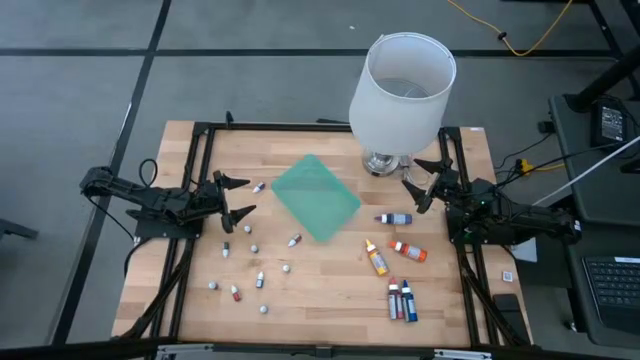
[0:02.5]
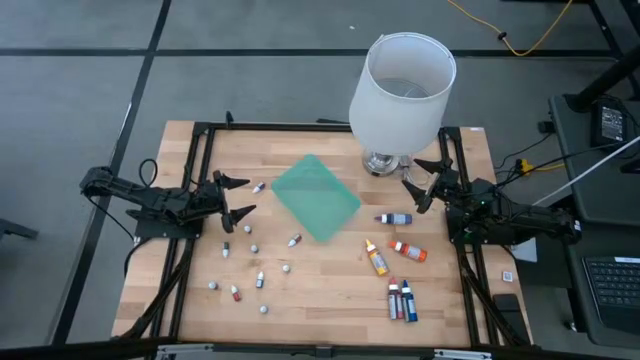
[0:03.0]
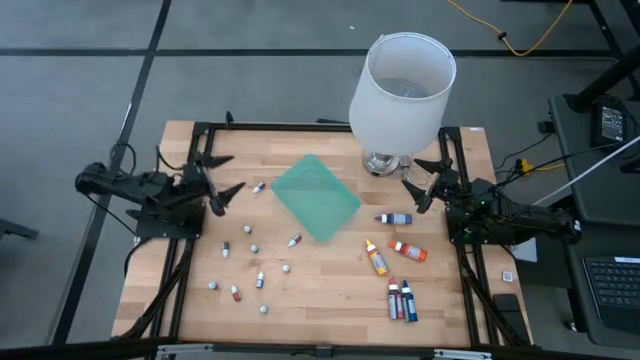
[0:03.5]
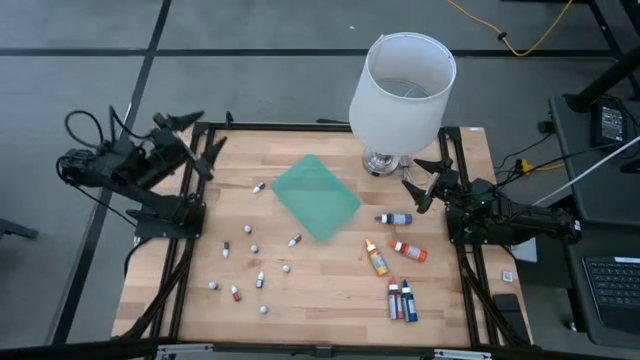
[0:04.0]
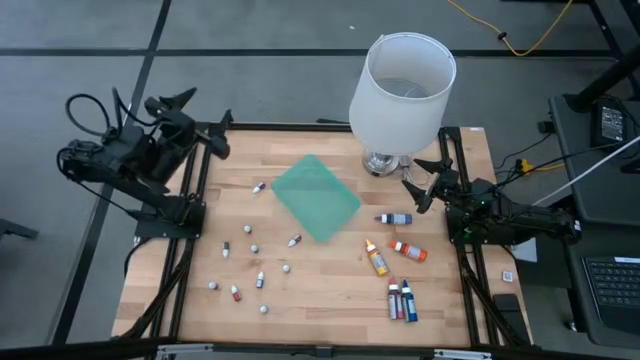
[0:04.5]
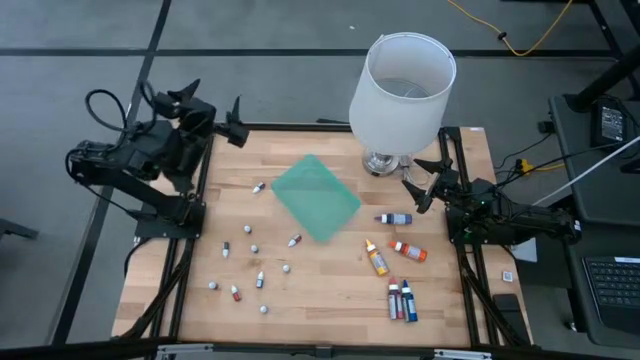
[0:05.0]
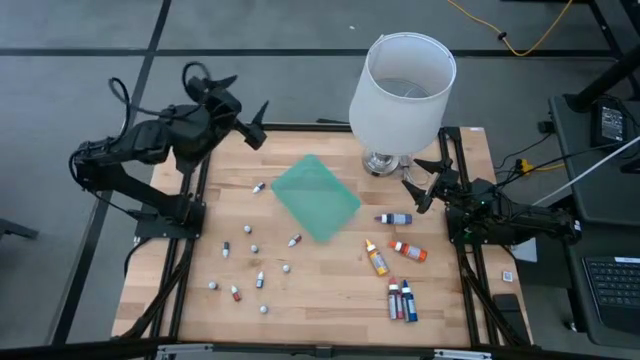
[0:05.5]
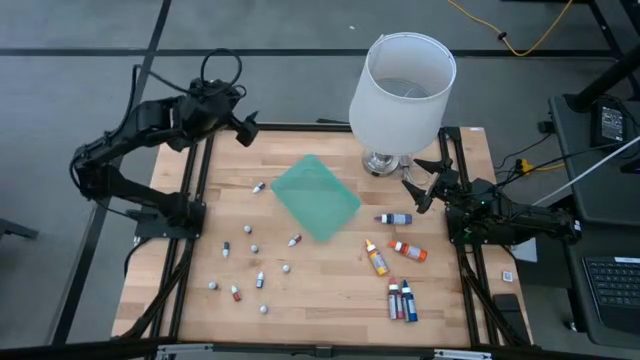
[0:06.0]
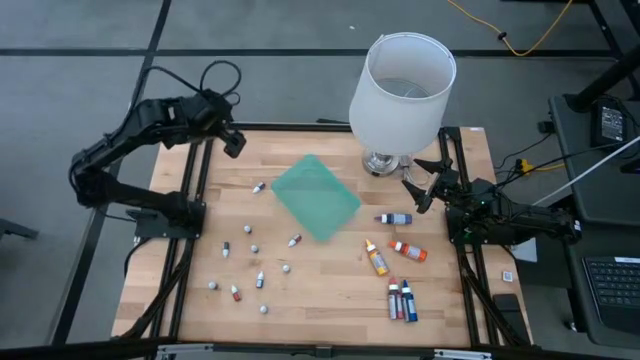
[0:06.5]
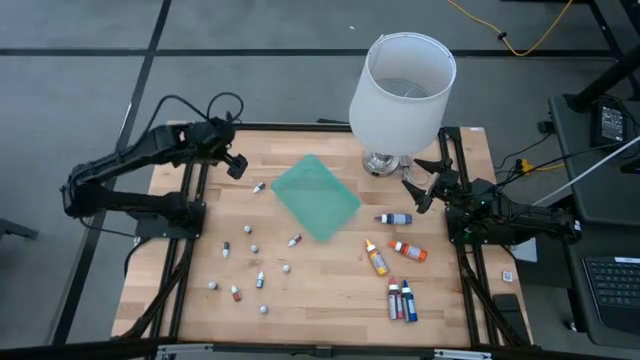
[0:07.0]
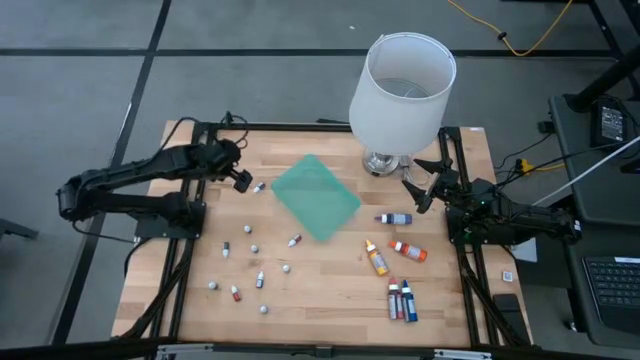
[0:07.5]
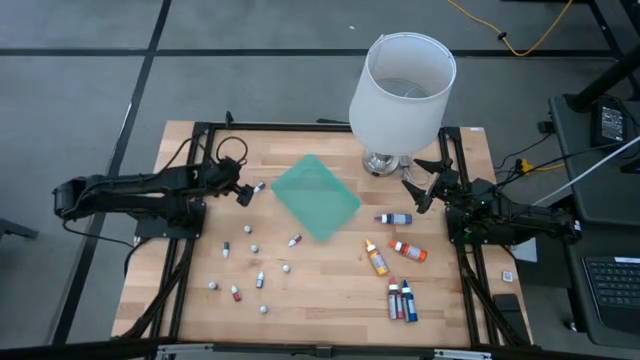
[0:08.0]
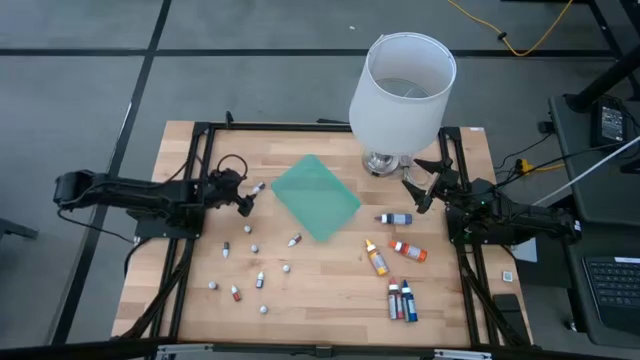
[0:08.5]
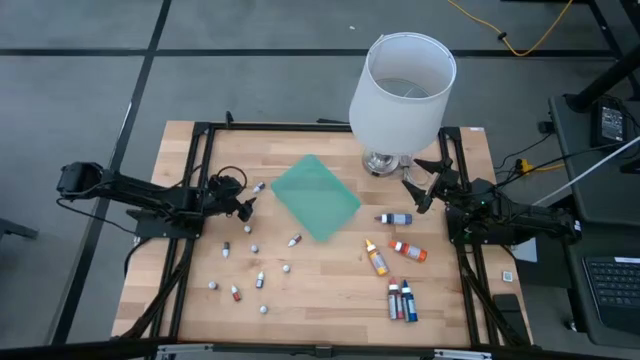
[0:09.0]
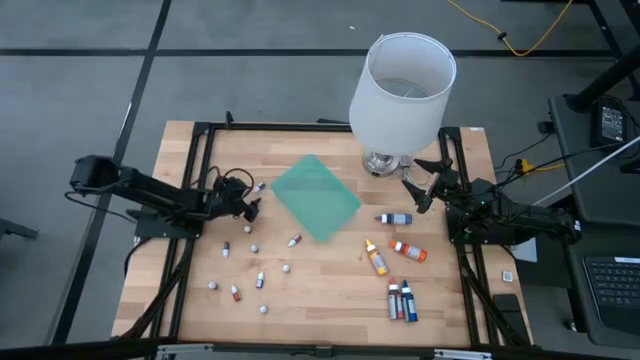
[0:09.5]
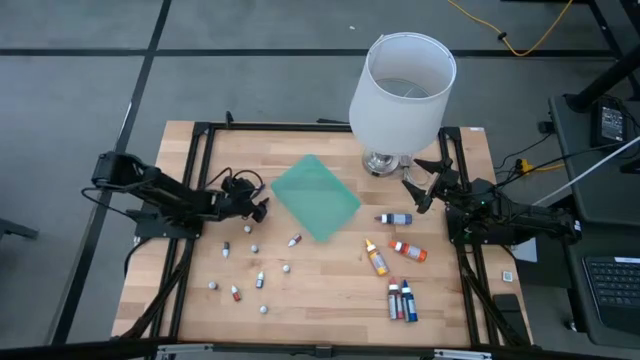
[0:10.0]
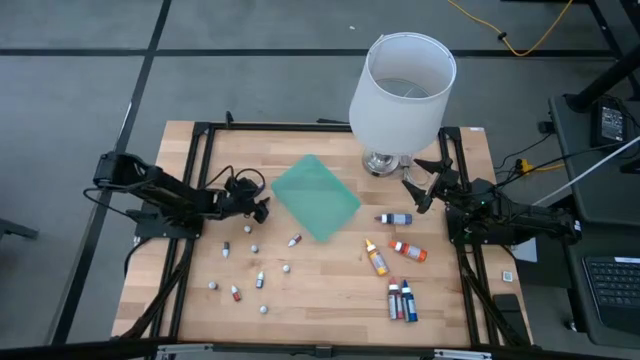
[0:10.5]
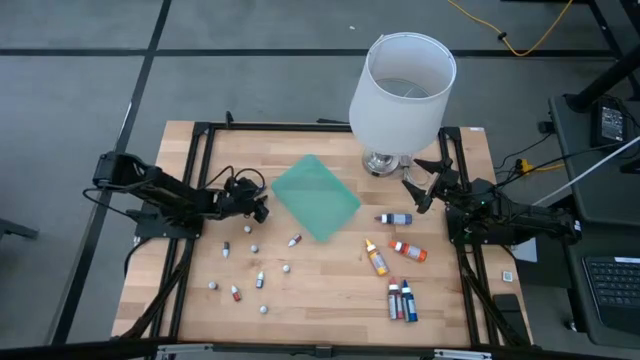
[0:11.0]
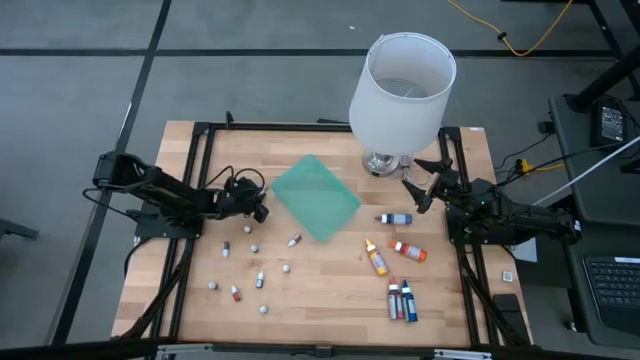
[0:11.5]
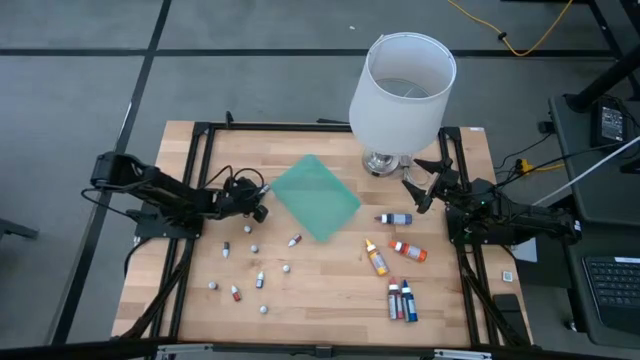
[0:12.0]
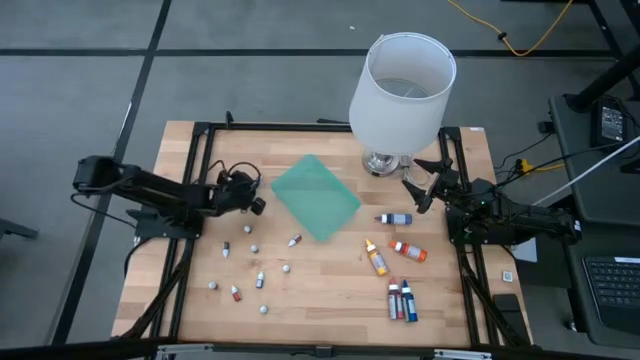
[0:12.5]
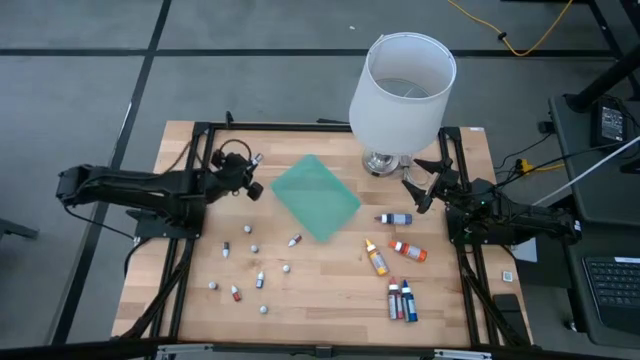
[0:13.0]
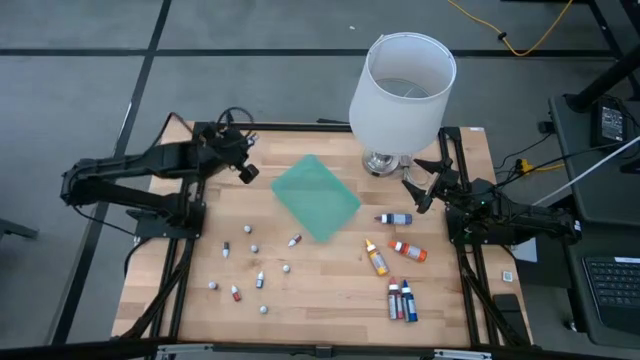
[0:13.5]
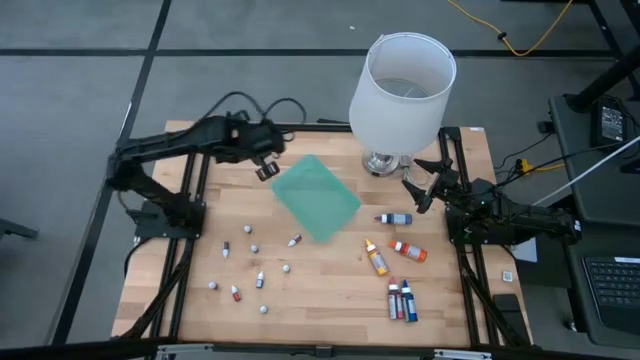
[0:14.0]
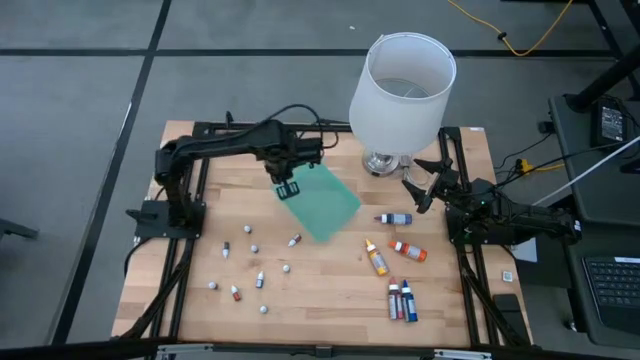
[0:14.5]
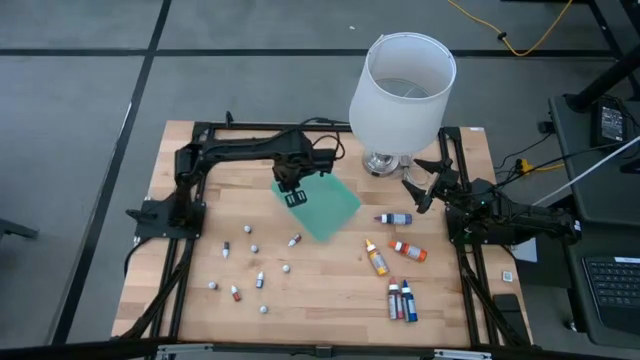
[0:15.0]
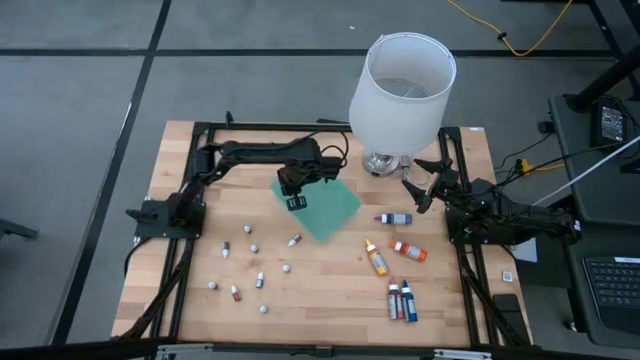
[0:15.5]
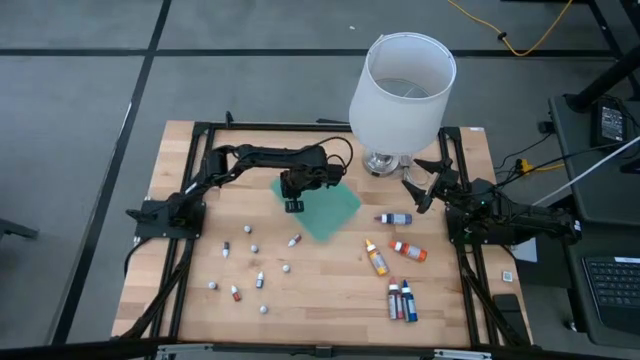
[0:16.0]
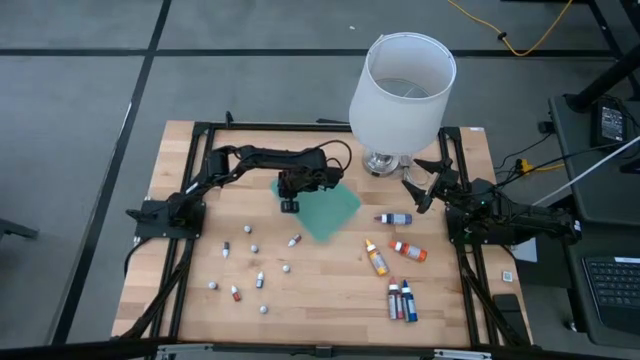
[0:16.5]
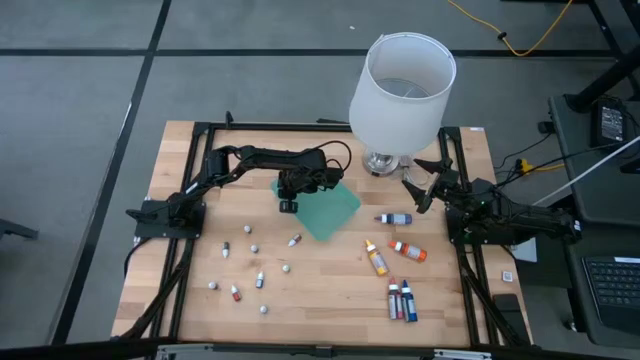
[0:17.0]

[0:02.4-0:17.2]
Task: Pick & Place food coloring
Put the small purple food coloring bottle into the green bin

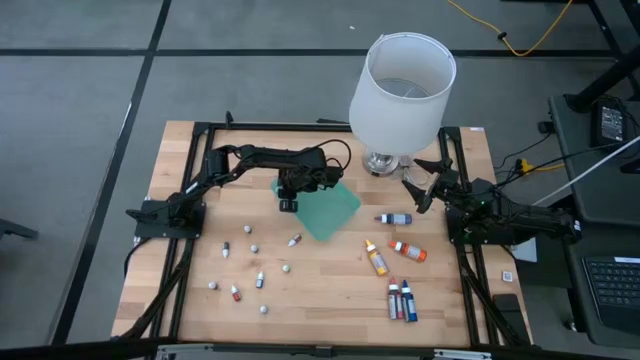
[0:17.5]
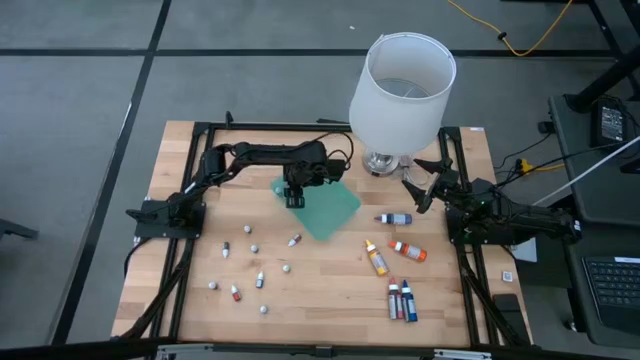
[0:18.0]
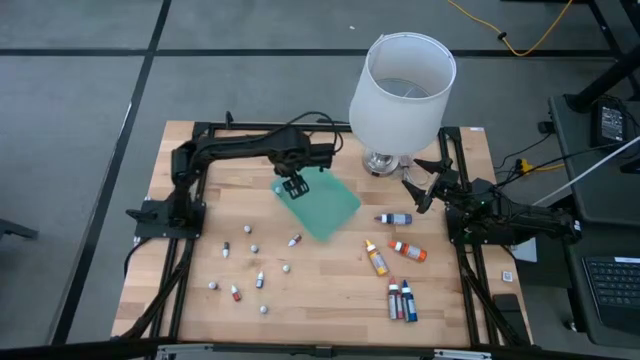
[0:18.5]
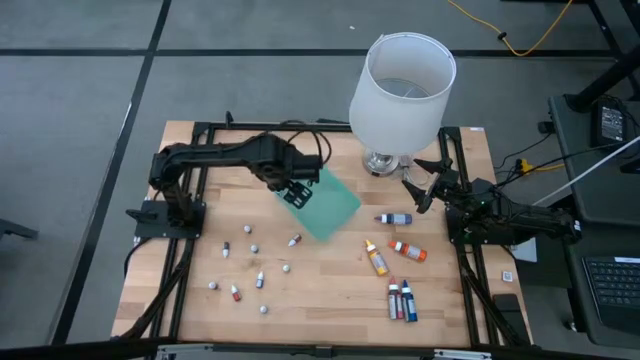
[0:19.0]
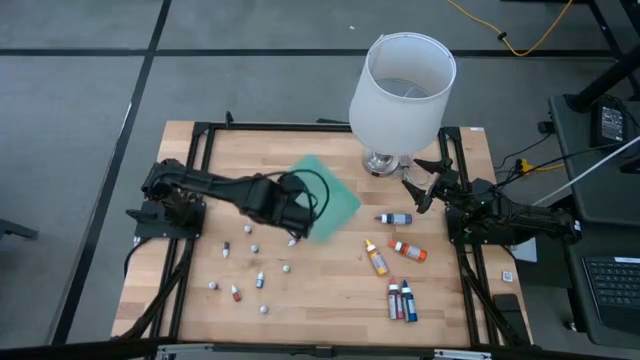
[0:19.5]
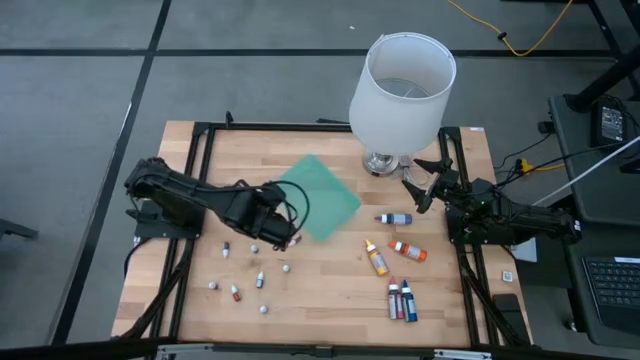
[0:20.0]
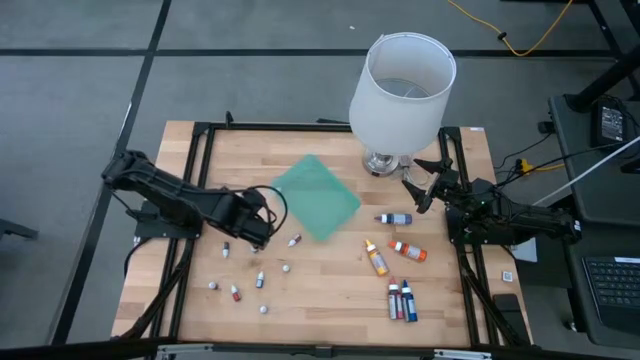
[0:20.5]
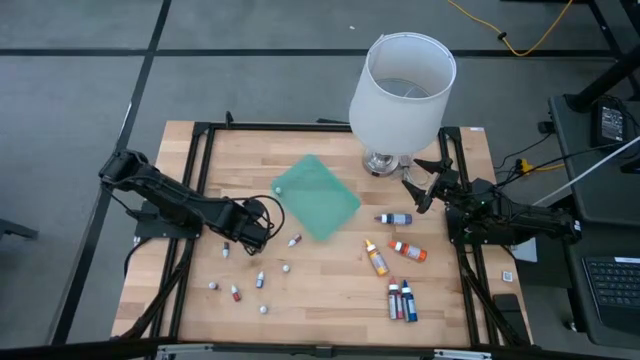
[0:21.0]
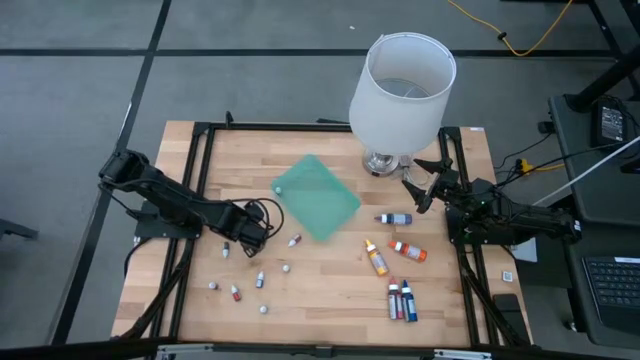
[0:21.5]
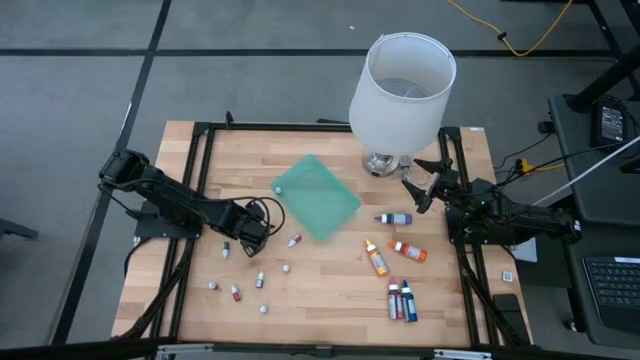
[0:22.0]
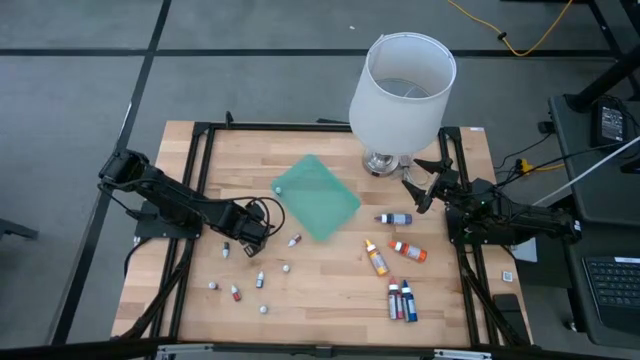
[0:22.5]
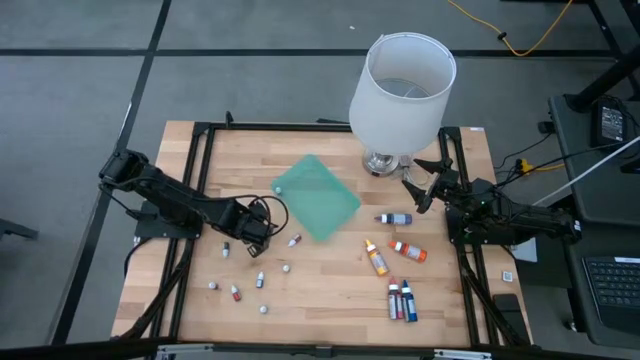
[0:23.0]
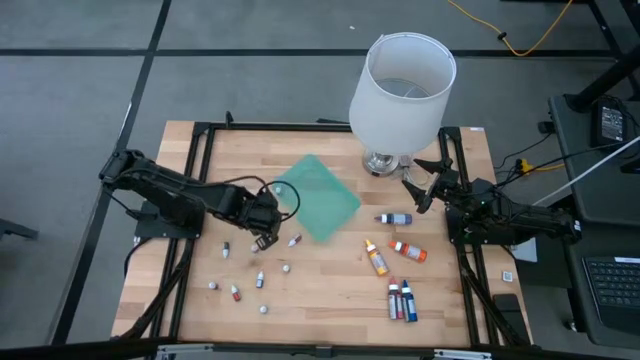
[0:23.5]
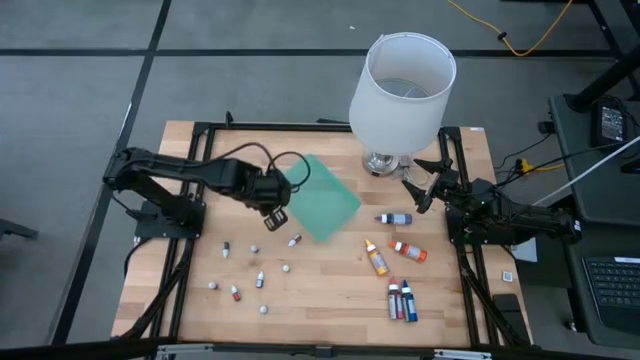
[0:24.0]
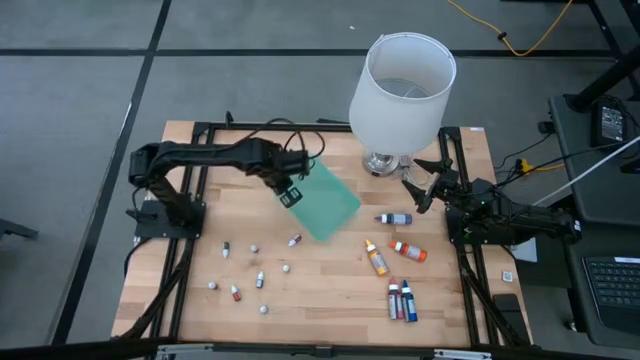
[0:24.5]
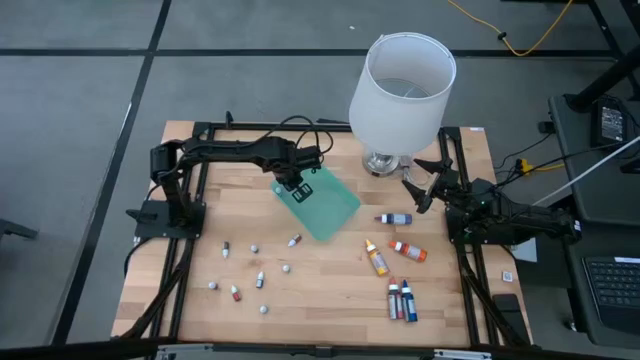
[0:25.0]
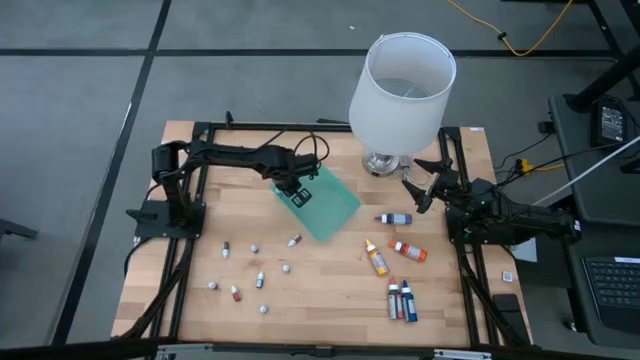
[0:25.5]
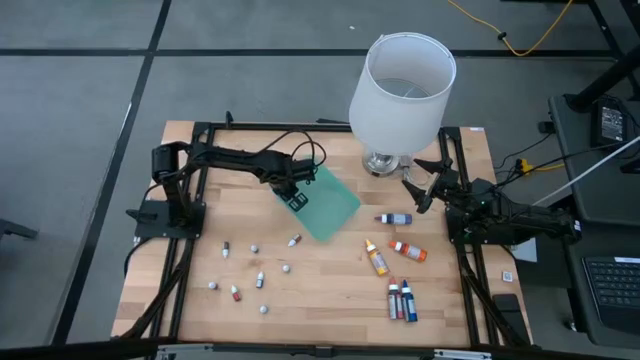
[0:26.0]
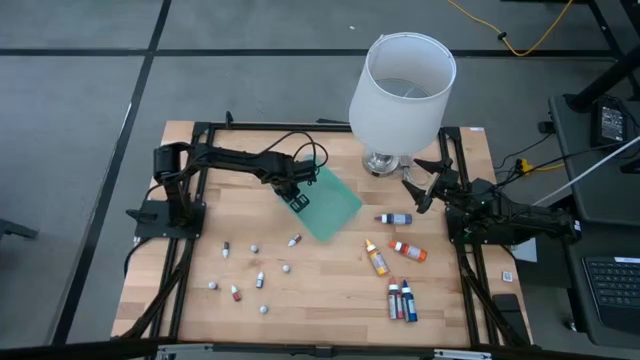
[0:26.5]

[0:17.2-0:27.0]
Put the top left small black food coloring bottle into the green bin
